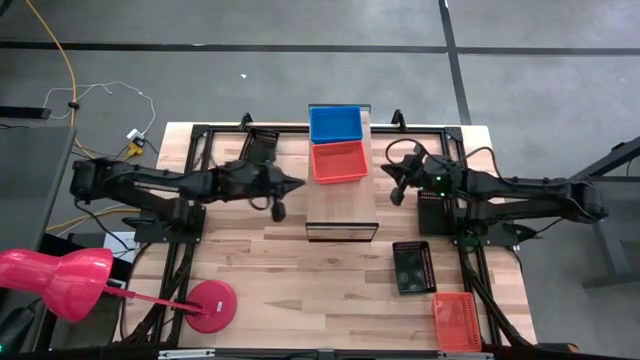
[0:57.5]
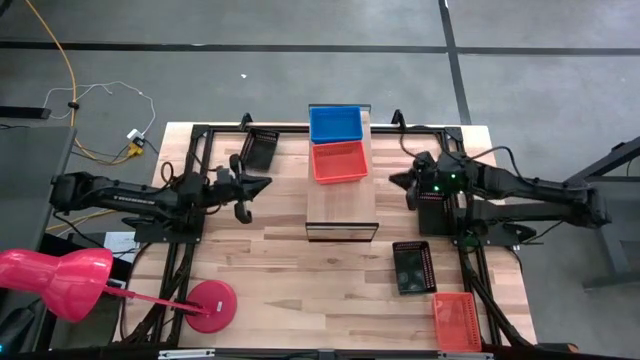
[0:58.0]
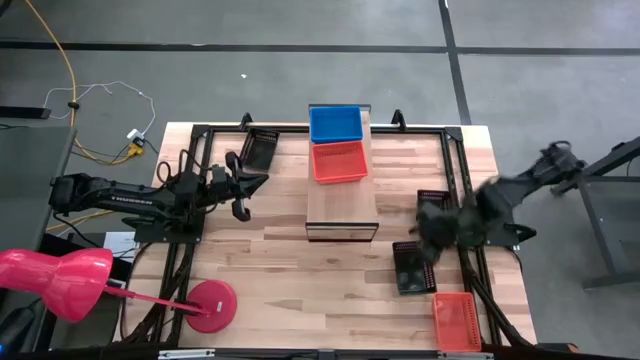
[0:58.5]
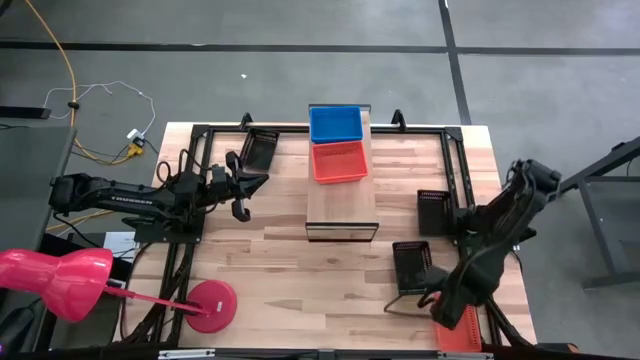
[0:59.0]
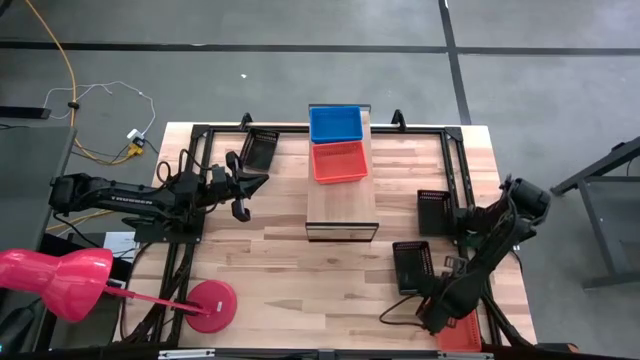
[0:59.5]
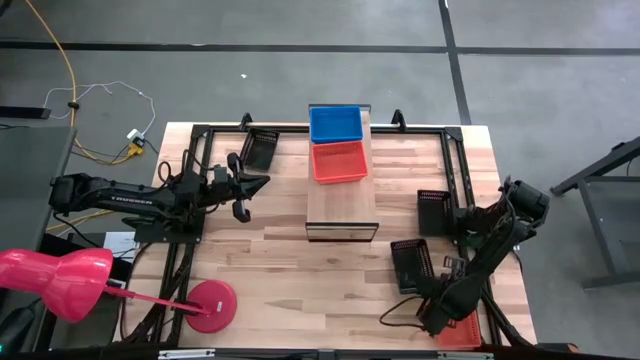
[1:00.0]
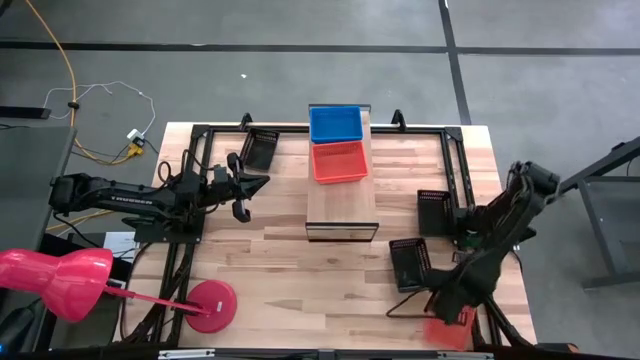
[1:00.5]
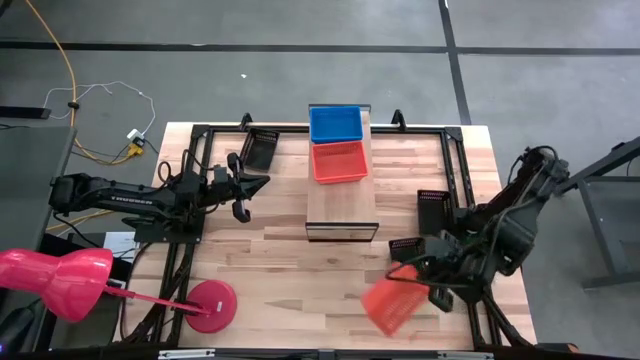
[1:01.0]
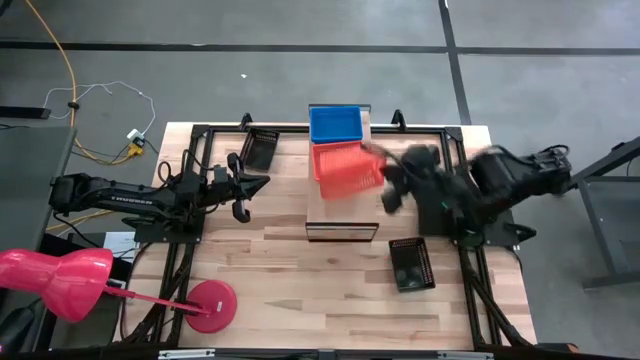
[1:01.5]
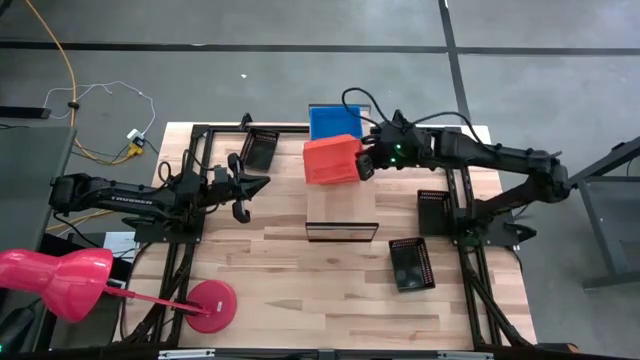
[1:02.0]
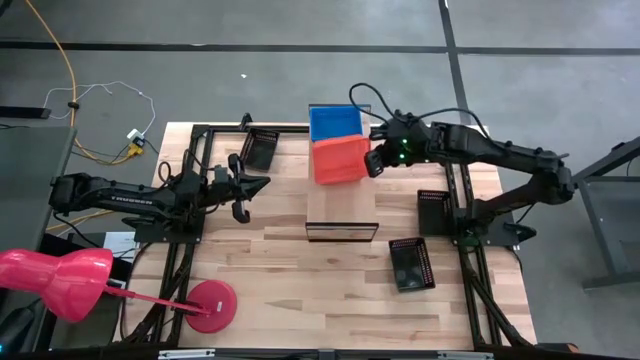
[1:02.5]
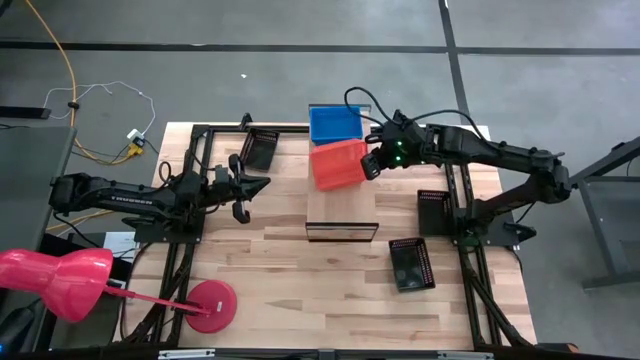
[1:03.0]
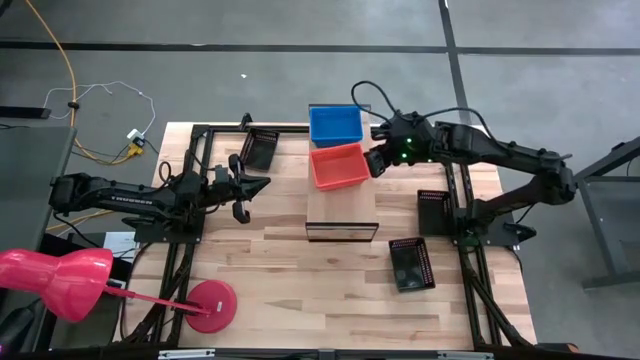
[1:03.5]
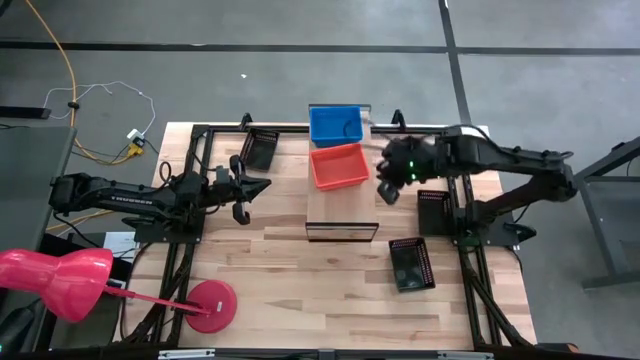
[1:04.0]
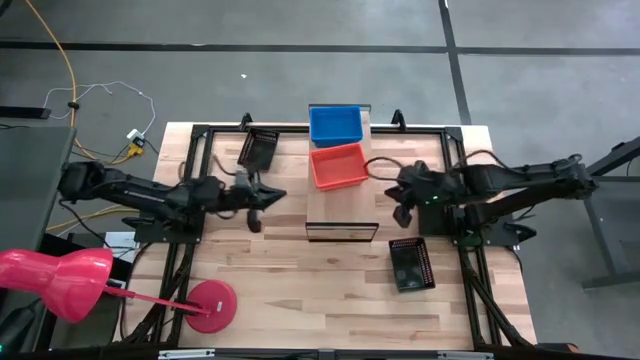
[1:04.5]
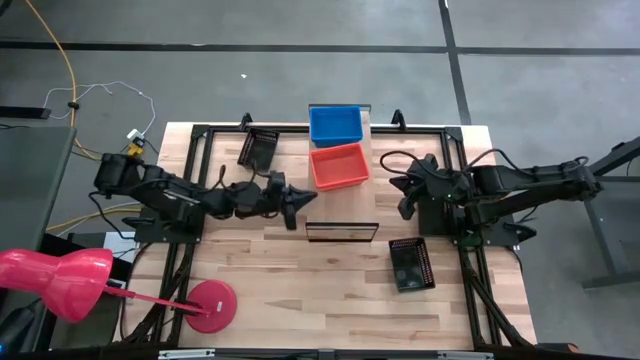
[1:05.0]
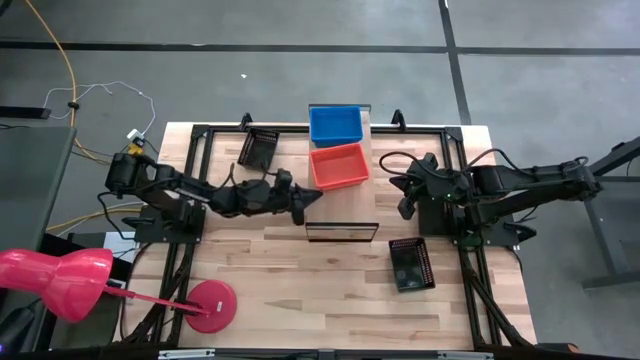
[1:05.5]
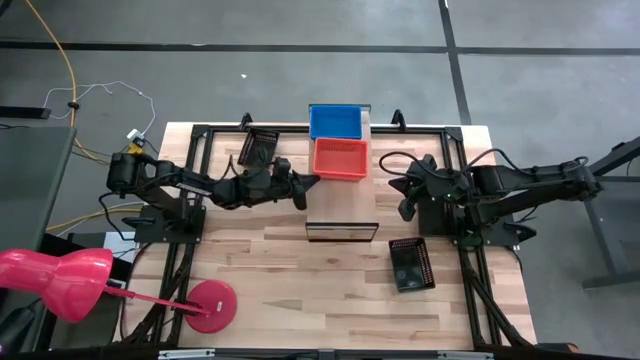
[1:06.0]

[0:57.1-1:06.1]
Task: Stack baskets on shelf by color
Stack the orange bin on top of the orange bins on the shelf

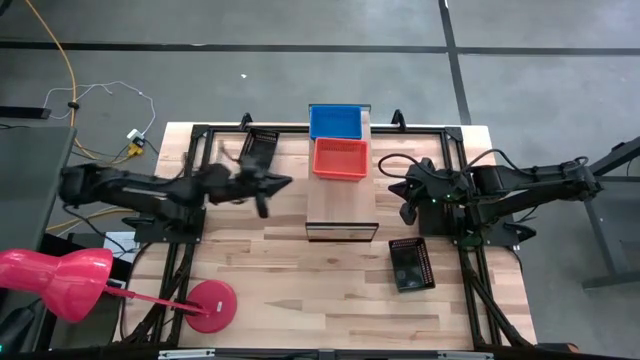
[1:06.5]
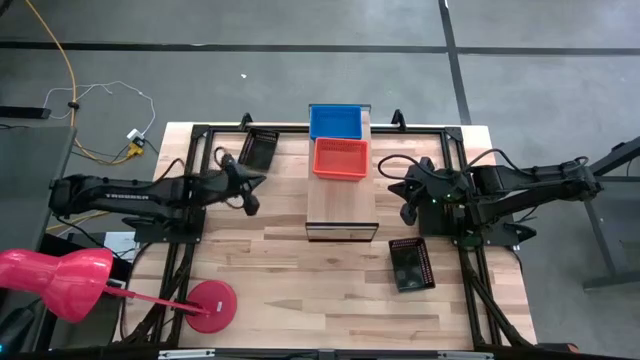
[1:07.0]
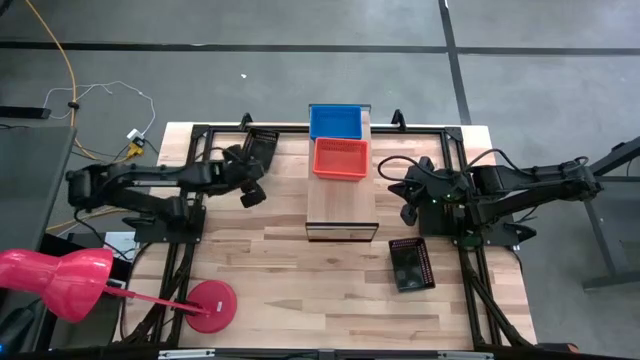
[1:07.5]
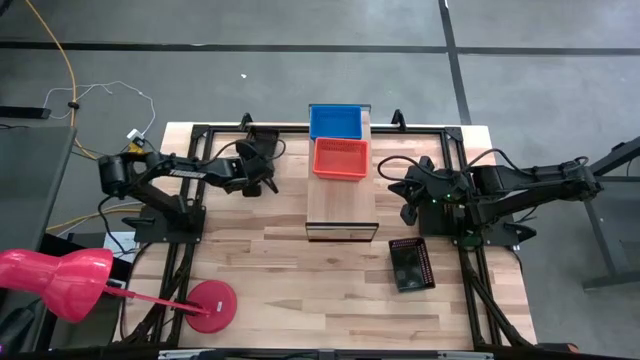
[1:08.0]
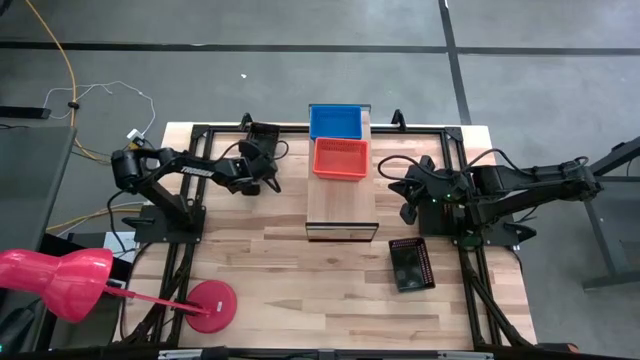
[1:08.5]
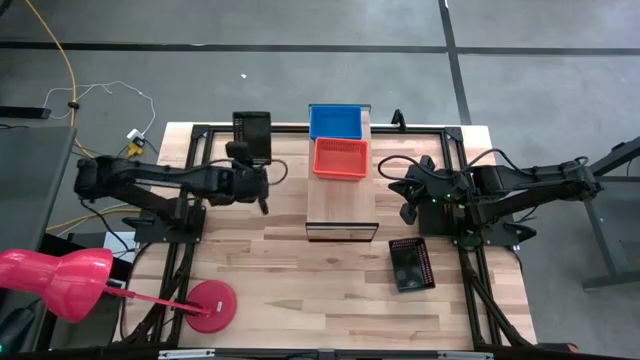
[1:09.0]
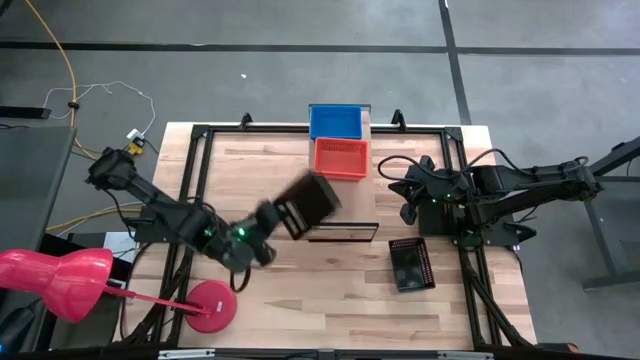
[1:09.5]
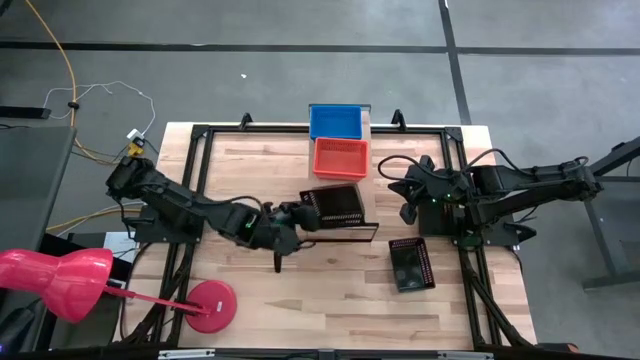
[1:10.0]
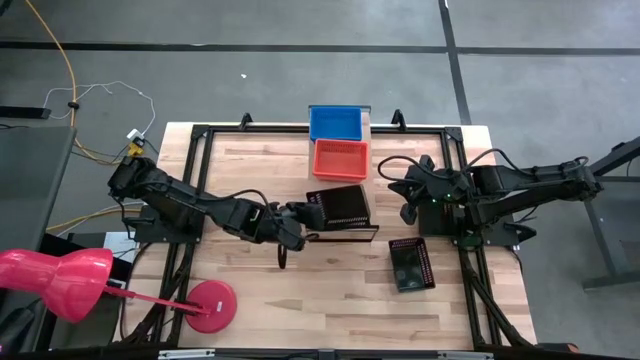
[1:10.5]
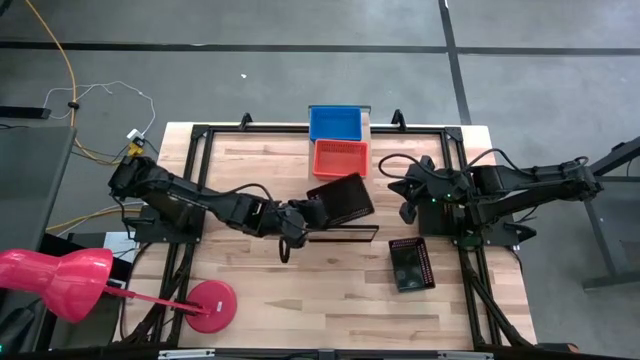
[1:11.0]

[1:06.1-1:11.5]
Put the top black bin on the shelf

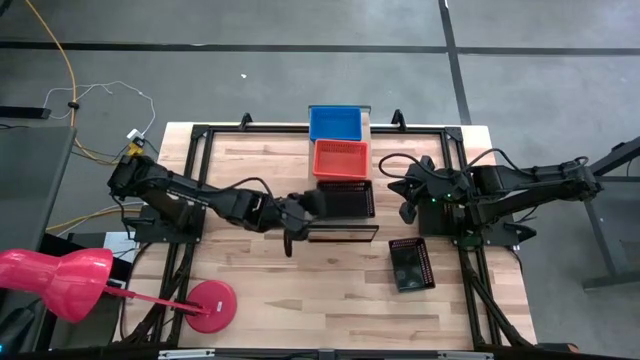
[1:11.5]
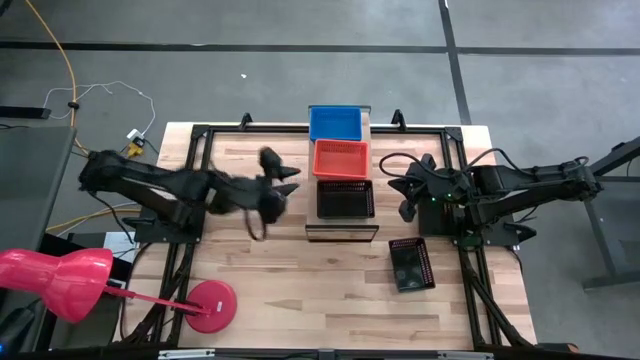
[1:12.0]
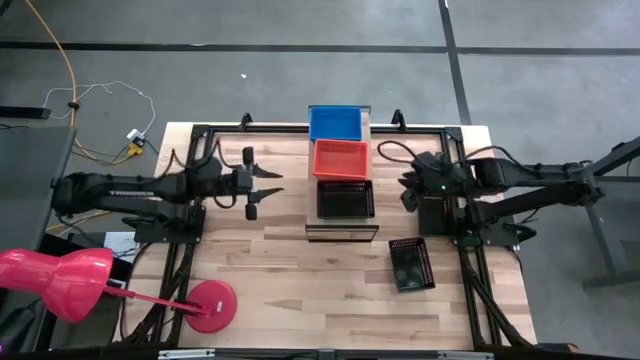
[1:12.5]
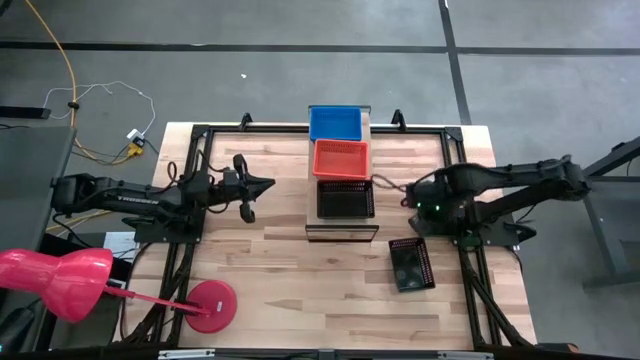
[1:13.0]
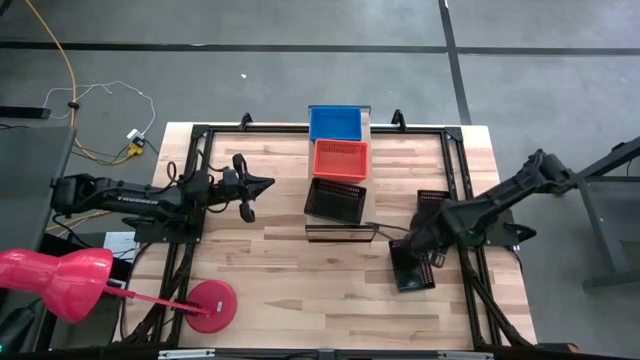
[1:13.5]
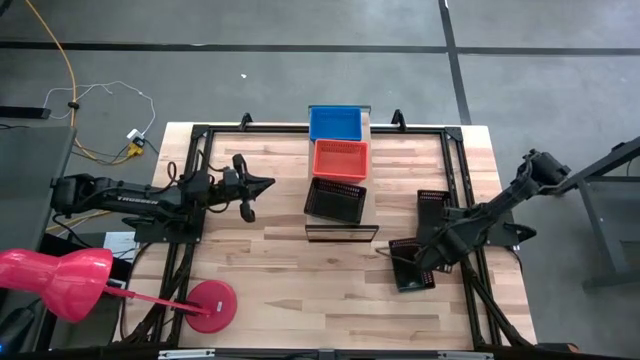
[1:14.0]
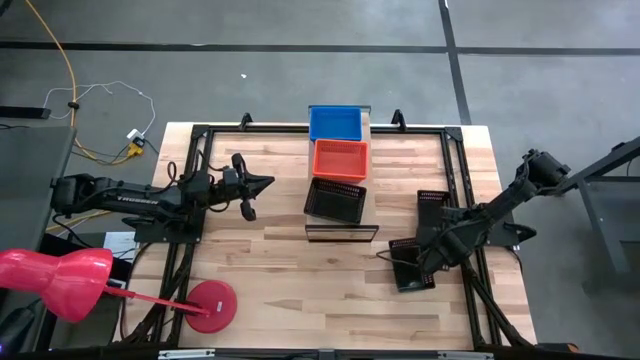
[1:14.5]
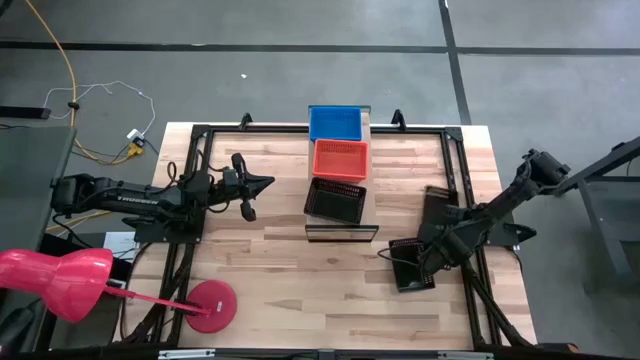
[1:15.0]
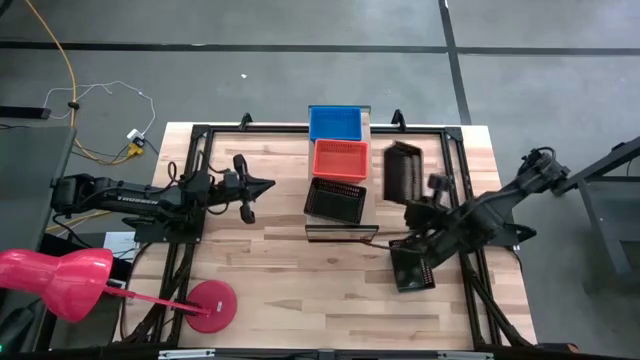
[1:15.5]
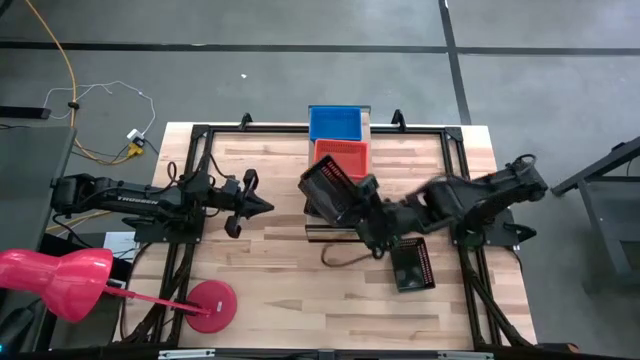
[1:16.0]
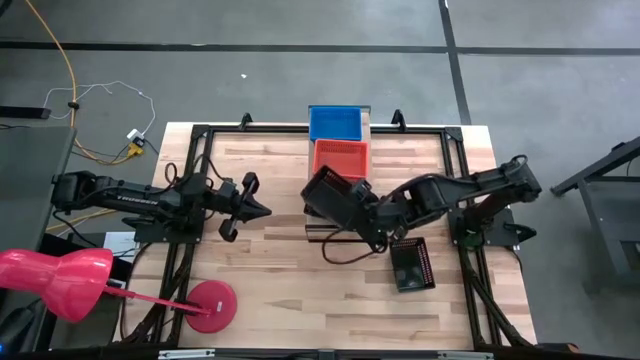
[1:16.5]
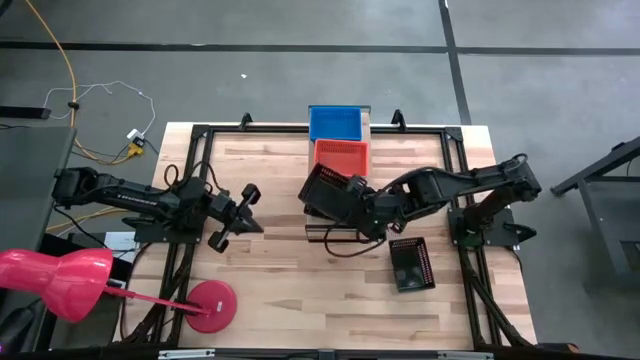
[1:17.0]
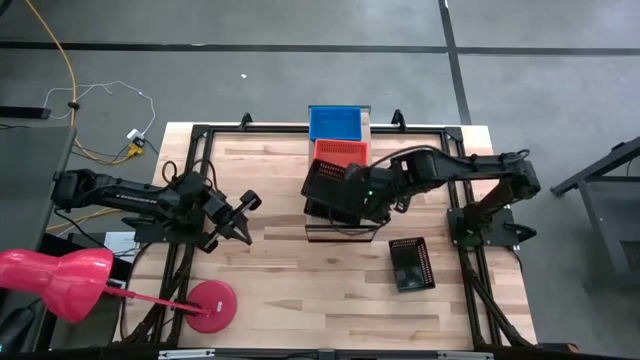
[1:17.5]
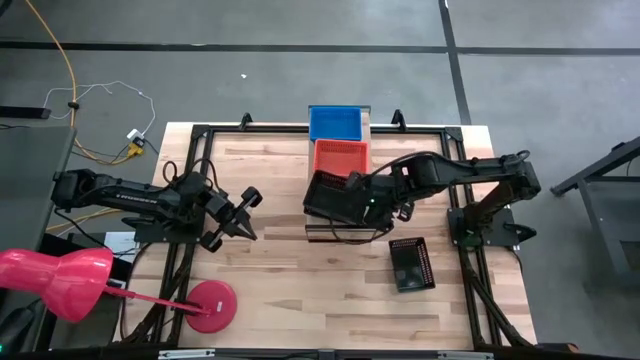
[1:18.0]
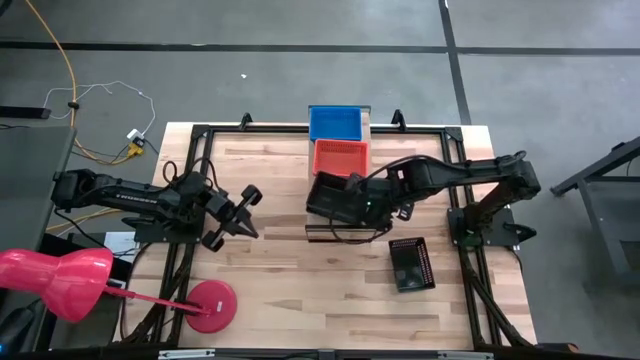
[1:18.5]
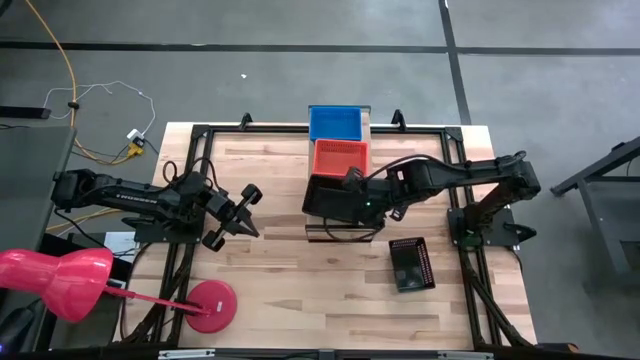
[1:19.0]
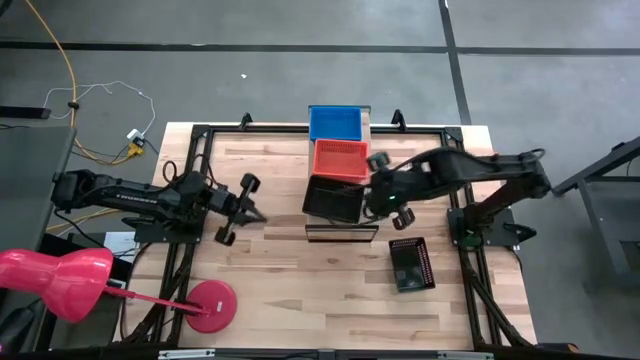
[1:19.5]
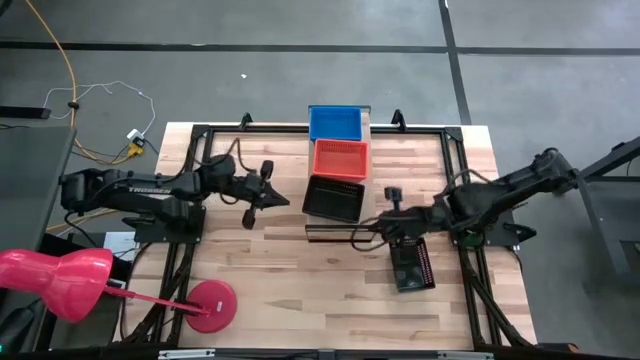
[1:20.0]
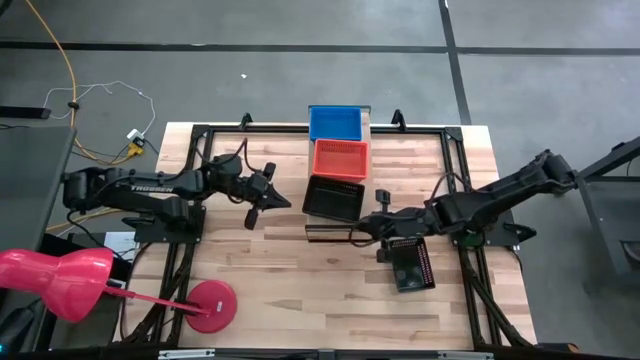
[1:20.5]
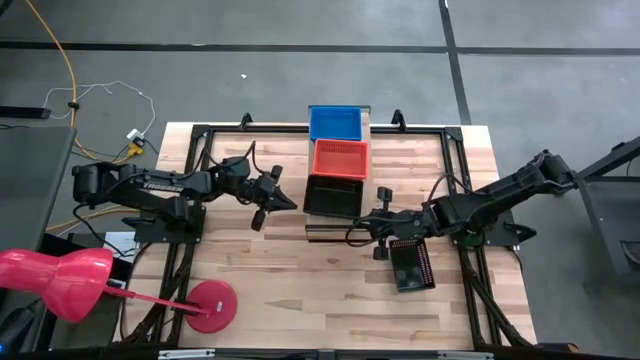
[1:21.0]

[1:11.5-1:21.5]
Stack the top black bin on top of the black bin on the shelf
